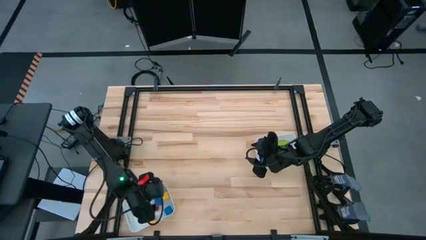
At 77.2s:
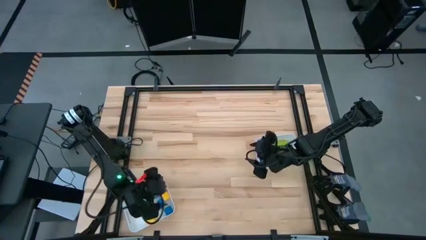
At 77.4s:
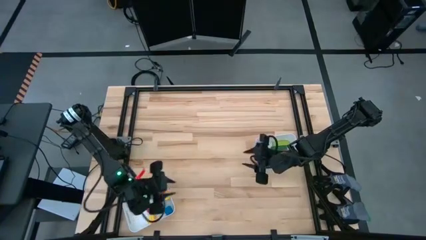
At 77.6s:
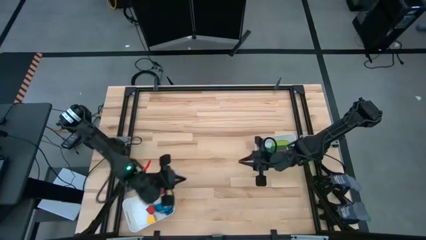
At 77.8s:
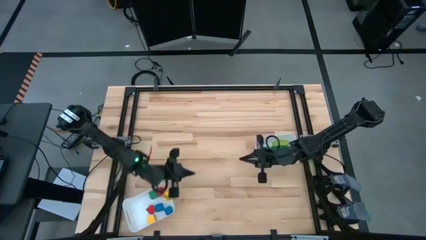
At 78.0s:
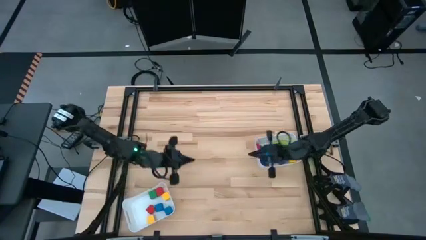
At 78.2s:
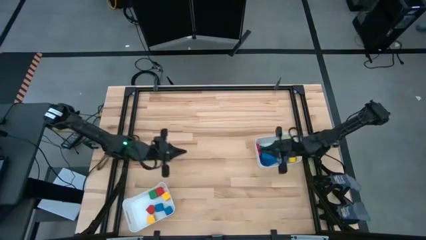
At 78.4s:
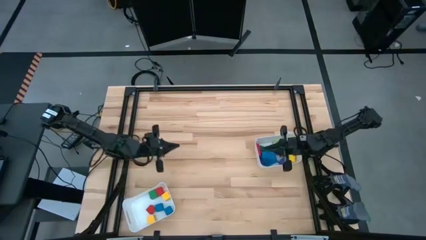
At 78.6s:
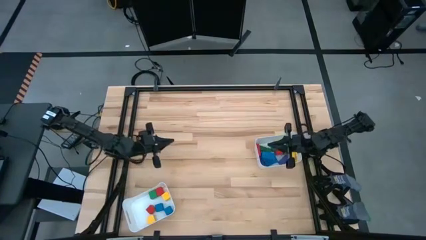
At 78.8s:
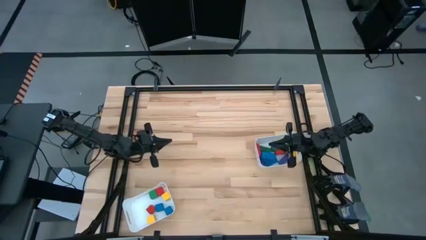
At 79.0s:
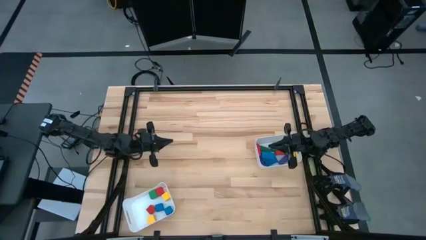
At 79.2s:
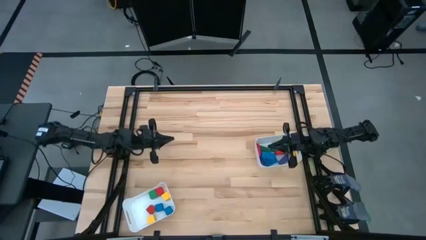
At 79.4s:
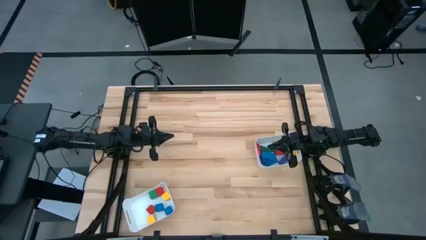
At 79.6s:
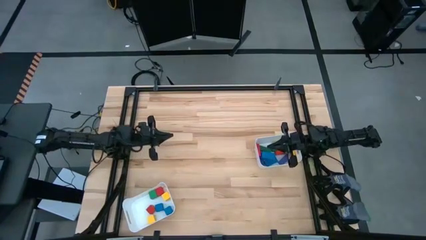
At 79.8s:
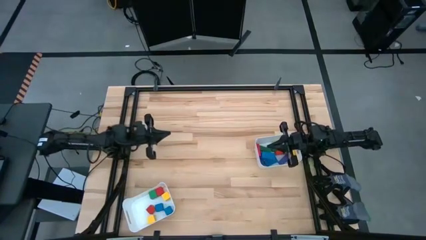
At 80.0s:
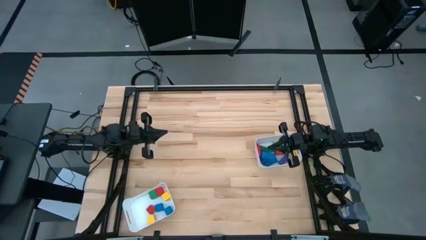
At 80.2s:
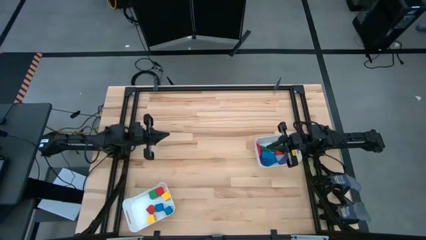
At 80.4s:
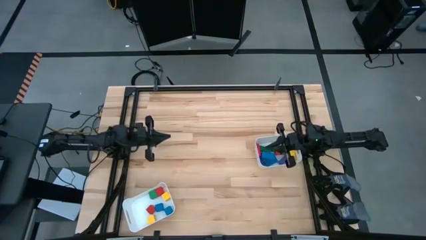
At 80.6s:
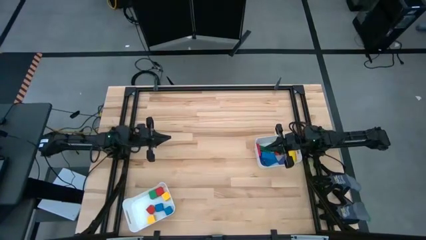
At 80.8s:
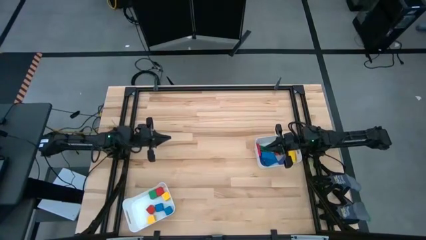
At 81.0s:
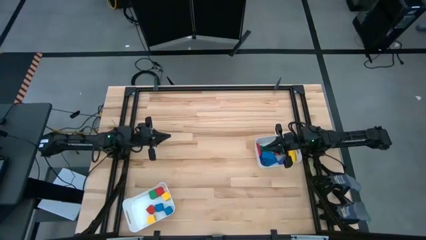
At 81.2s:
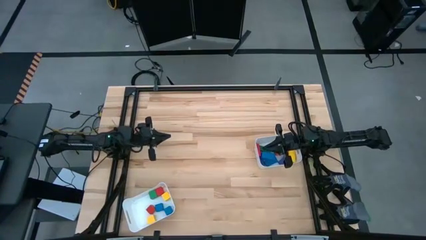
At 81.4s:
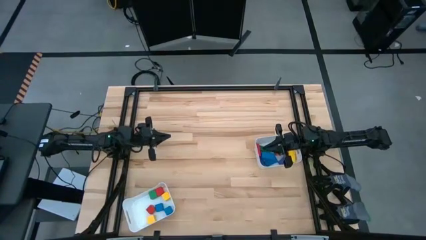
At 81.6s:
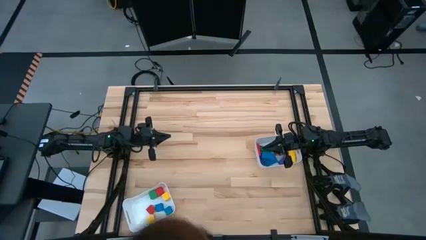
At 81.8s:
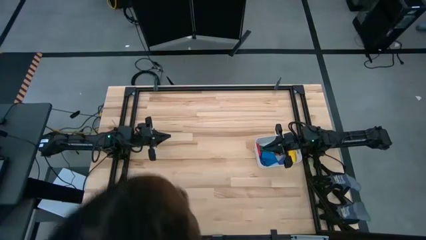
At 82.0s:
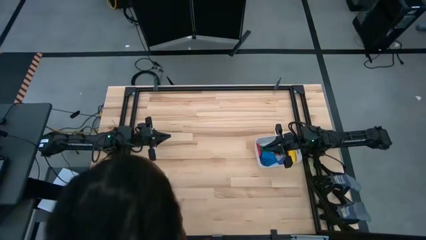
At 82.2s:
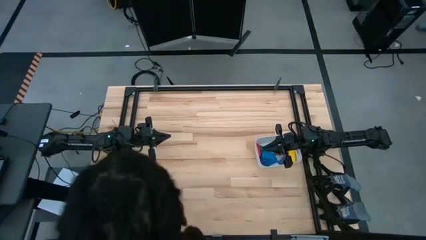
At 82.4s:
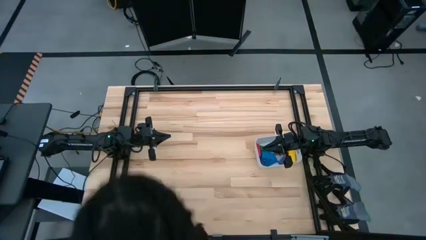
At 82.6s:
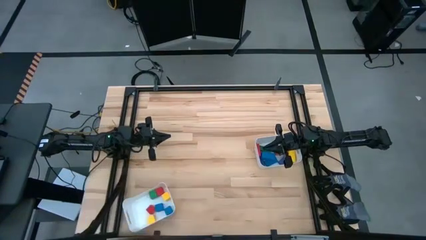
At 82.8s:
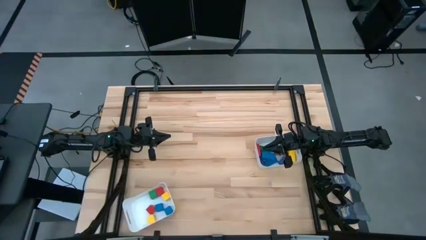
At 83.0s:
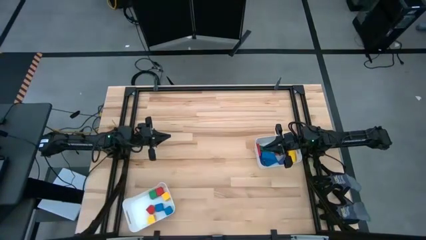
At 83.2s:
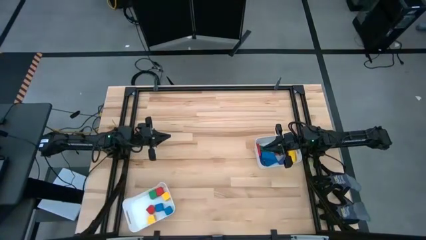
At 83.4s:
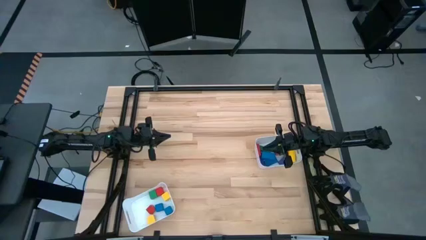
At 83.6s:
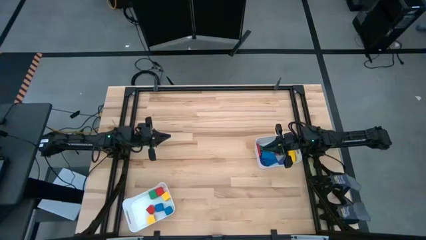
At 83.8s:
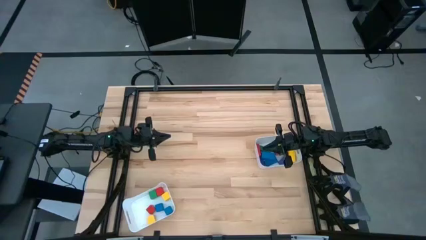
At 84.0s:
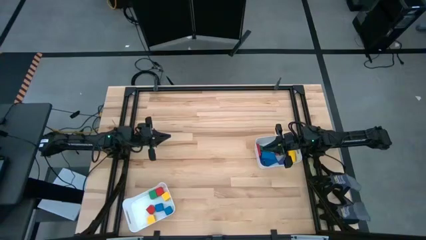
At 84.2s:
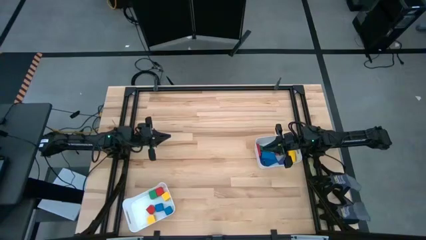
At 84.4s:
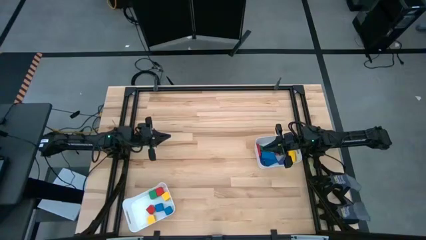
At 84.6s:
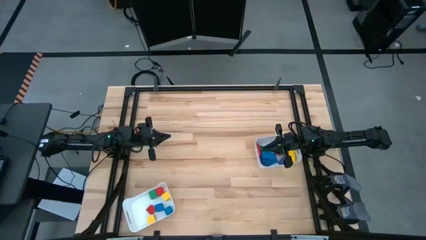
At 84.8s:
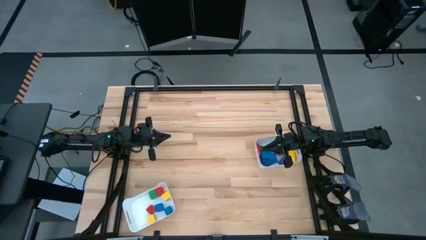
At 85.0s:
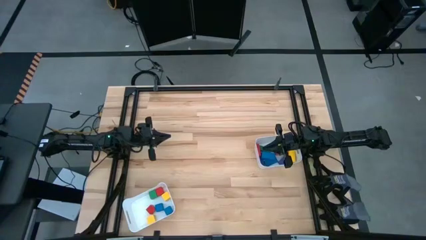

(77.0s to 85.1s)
Task: Sort blocks by size
Return to Home Position

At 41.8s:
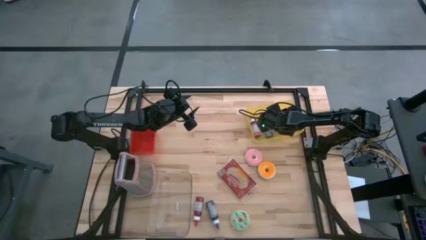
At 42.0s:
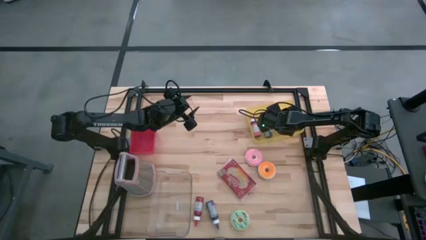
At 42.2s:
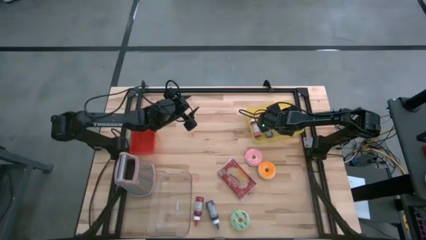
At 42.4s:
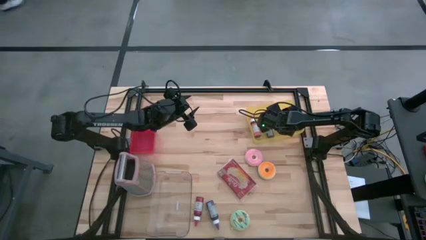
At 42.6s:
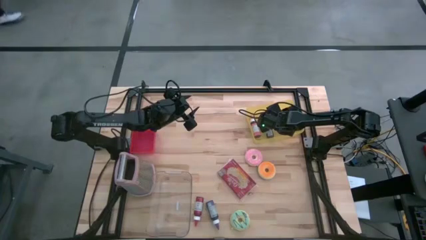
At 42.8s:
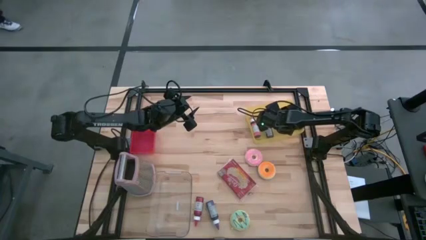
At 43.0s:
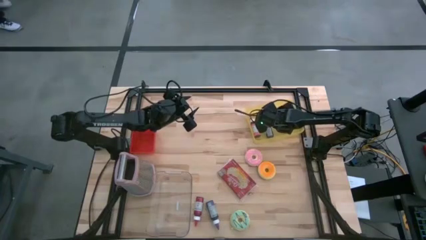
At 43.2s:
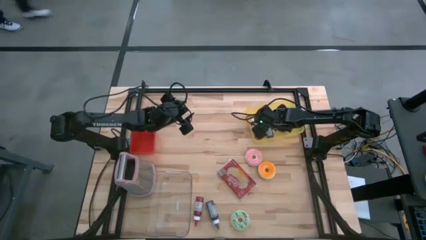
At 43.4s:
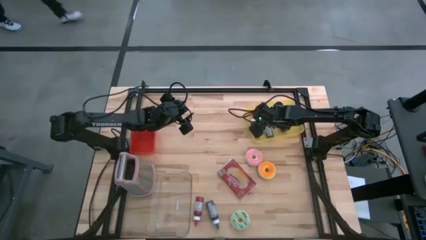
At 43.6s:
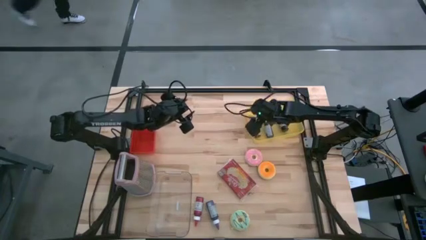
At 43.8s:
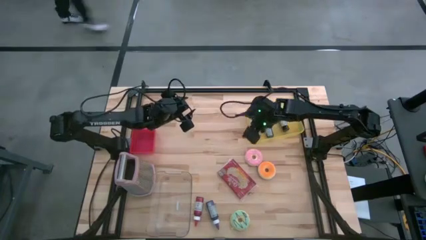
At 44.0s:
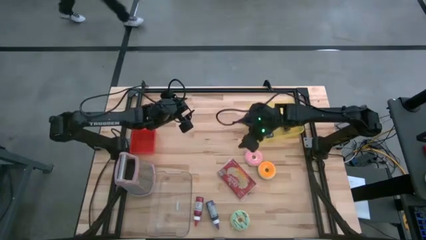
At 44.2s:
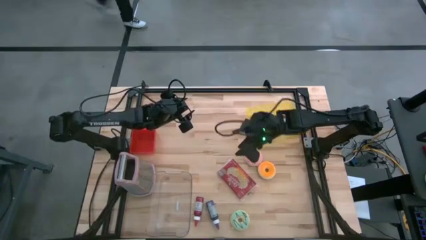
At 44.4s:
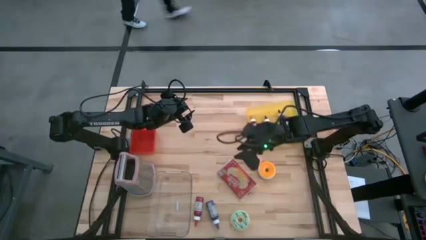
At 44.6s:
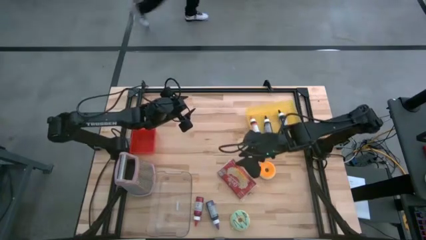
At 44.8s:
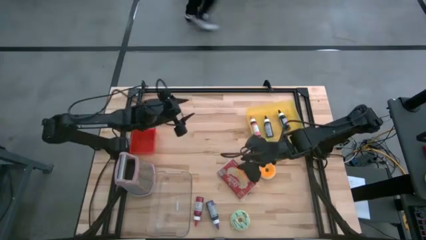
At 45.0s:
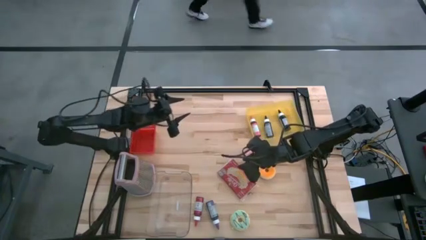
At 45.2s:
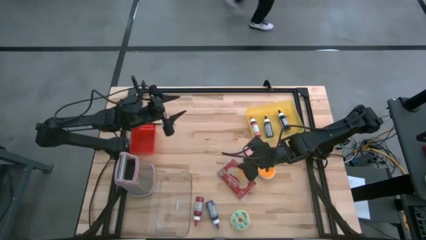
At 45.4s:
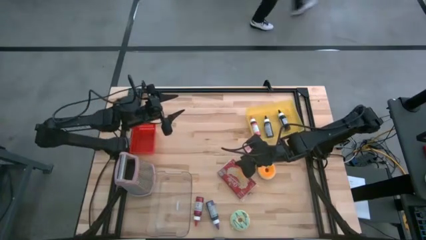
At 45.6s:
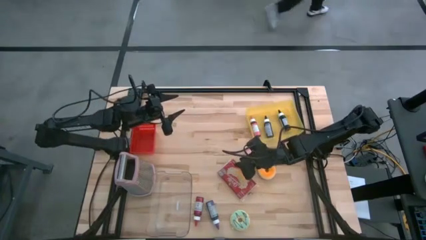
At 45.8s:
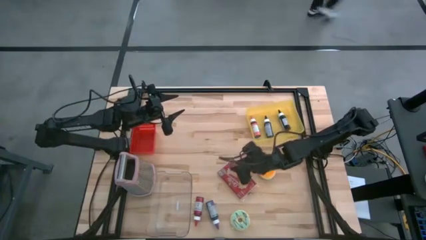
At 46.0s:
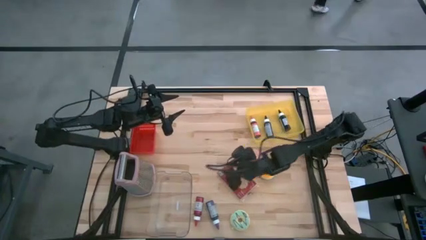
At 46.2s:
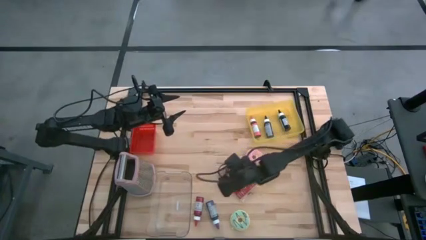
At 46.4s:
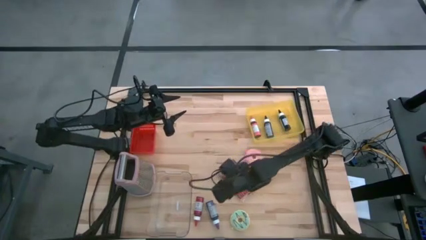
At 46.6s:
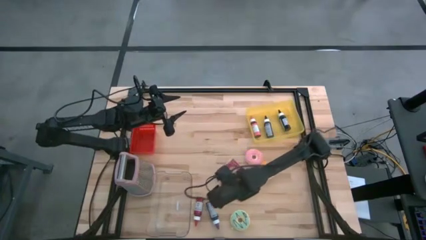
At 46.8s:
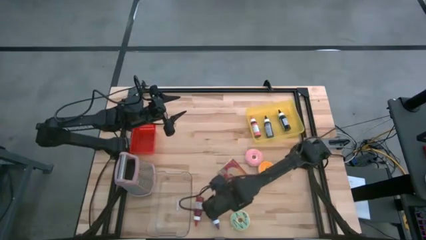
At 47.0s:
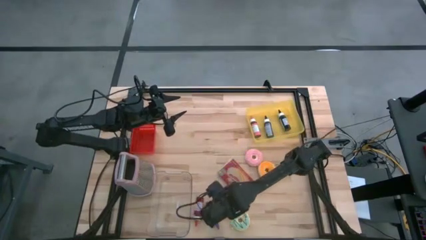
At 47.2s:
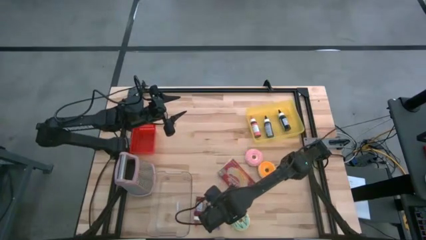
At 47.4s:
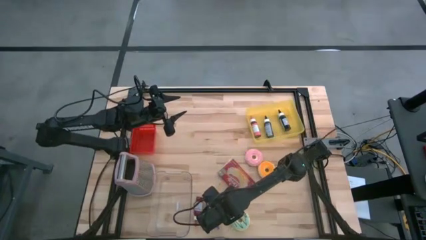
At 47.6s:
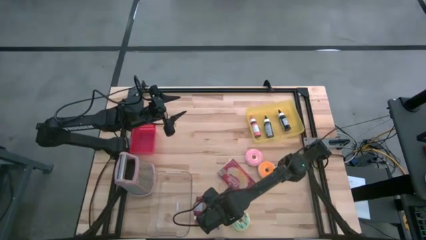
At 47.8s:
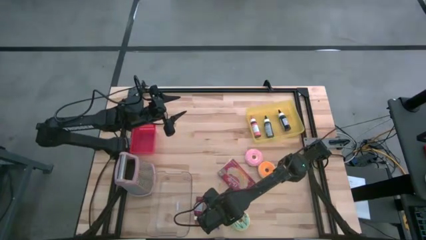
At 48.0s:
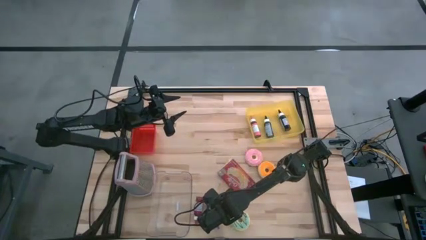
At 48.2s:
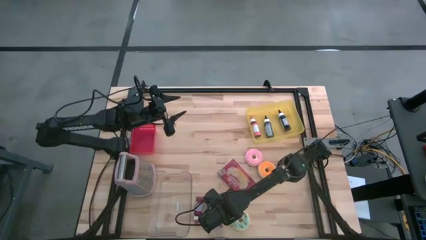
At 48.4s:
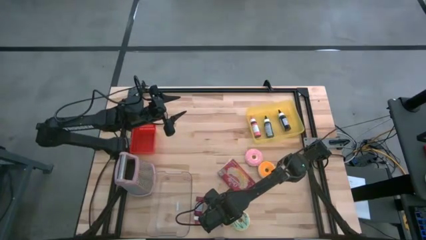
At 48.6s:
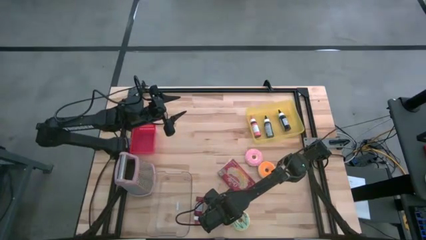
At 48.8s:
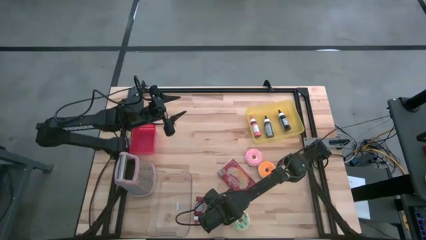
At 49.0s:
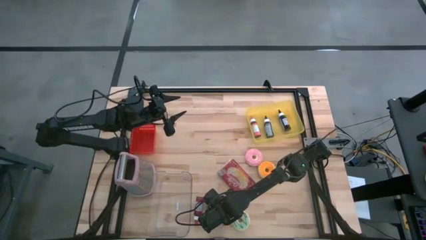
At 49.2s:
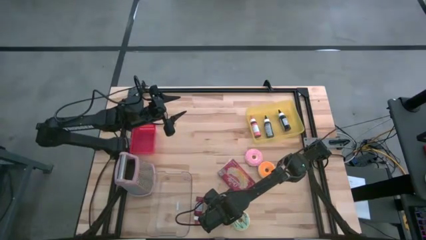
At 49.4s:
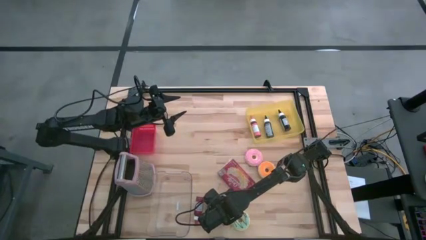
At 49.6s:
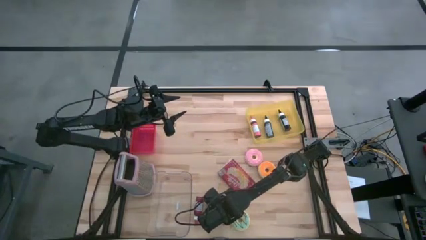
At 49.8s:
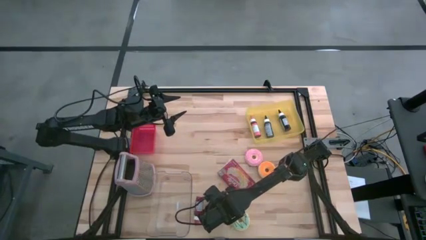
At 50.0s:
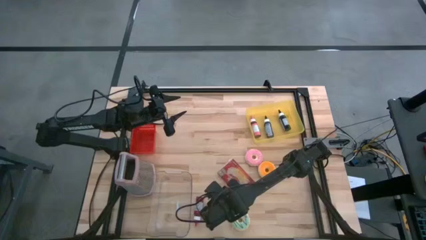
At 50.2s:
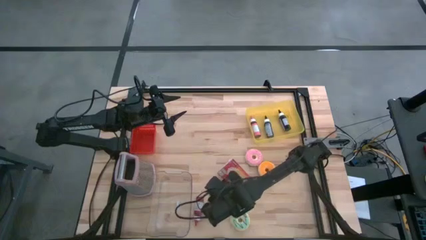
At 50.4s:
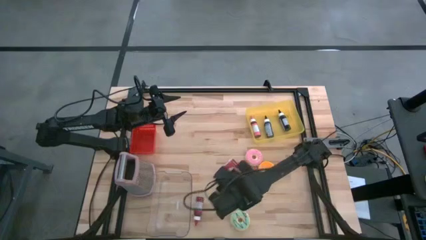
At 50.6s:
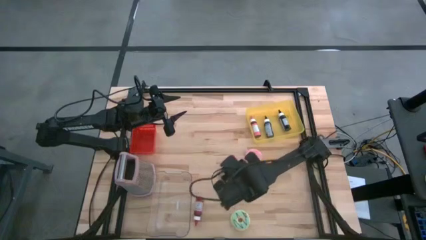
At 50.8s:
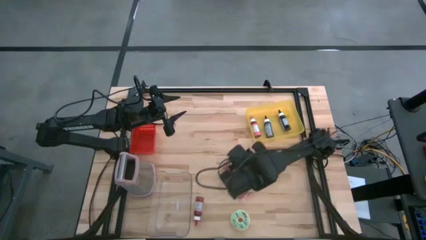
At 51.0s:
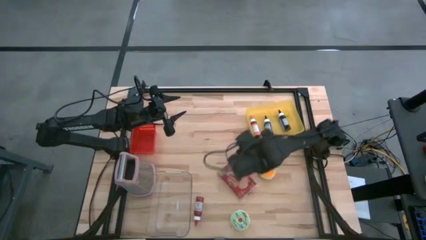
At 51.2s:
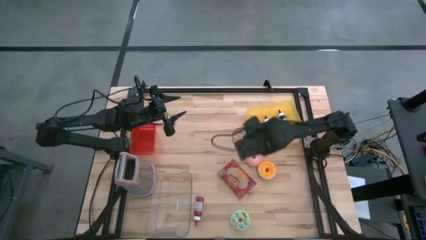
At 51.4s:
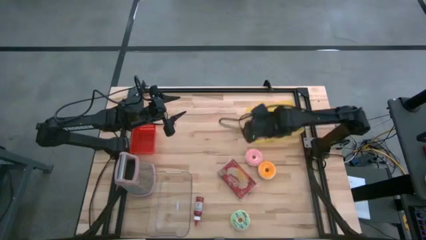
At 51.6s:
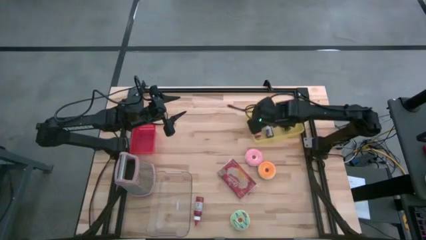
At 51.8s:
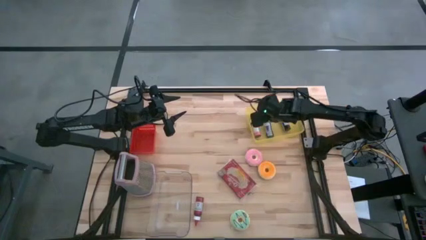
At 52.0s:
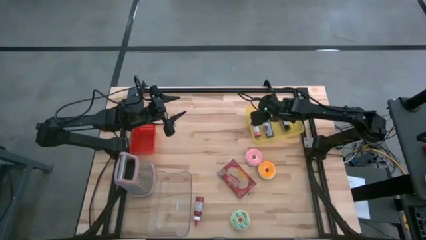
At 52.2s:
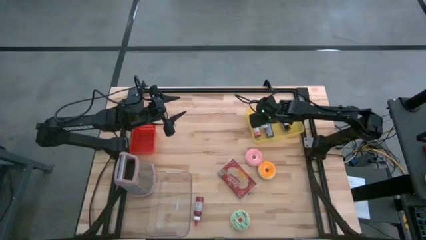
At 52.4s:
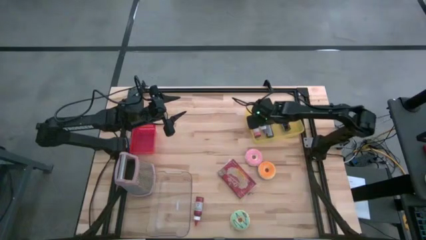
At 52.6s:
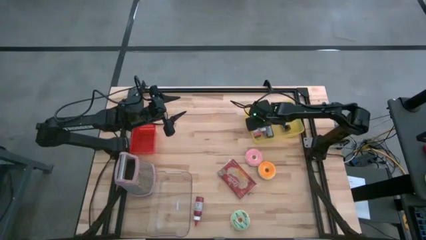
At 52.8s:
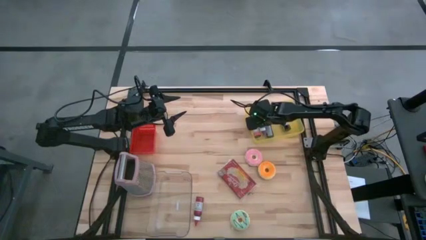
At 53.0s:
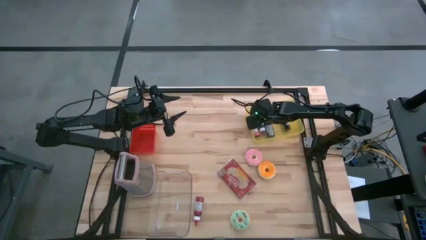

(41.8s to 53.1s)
Task: Pick & Place Food Item
Put the purple food coloring bottle into the yellow bin
